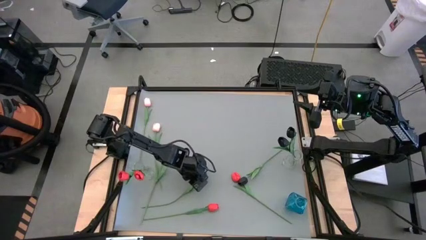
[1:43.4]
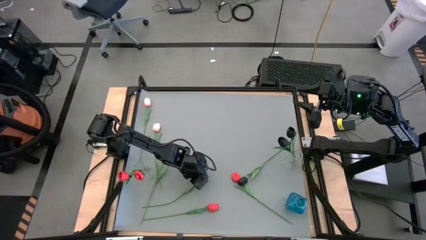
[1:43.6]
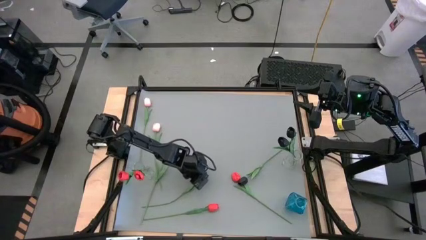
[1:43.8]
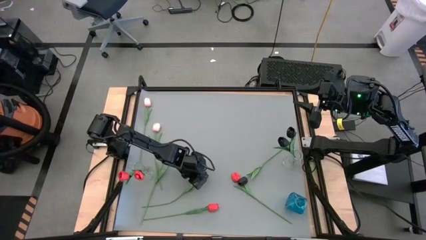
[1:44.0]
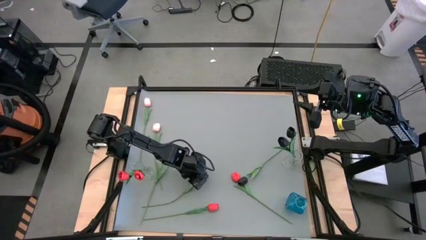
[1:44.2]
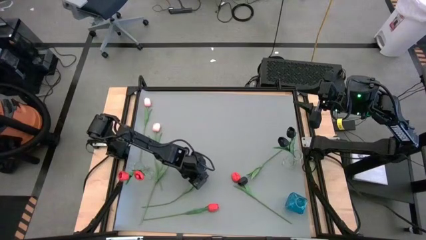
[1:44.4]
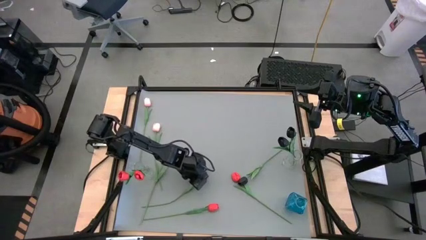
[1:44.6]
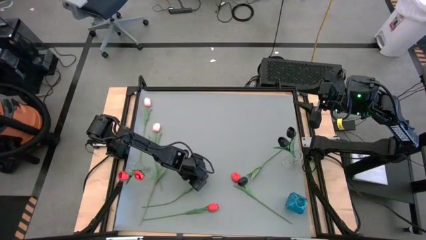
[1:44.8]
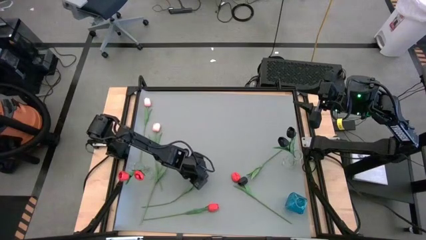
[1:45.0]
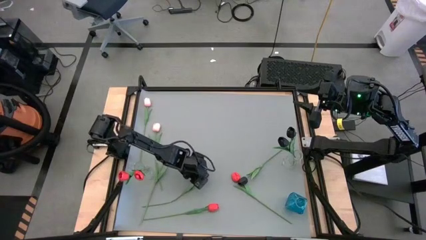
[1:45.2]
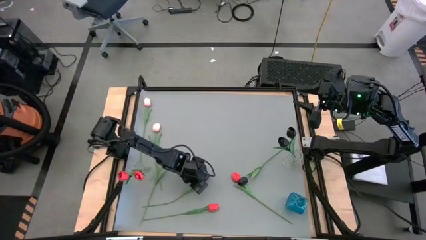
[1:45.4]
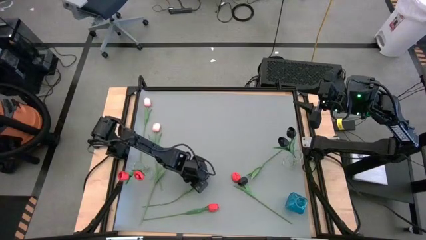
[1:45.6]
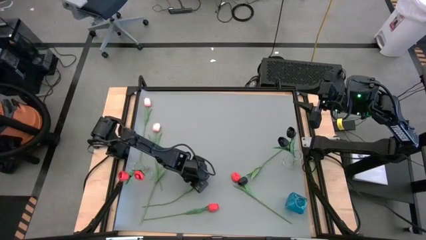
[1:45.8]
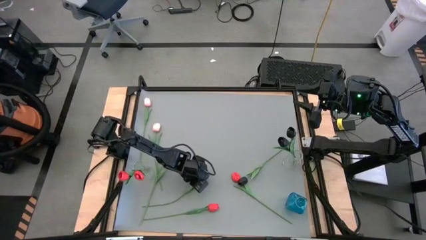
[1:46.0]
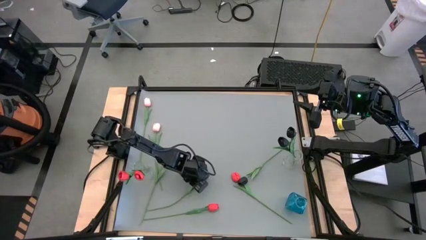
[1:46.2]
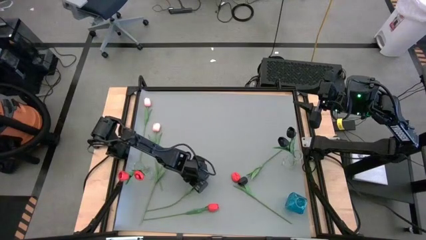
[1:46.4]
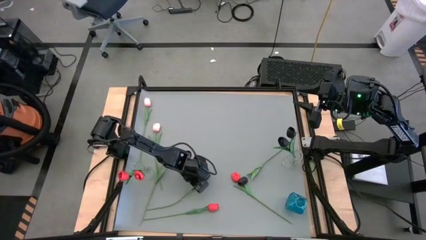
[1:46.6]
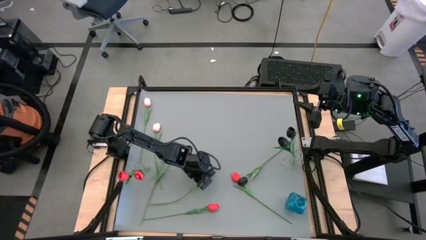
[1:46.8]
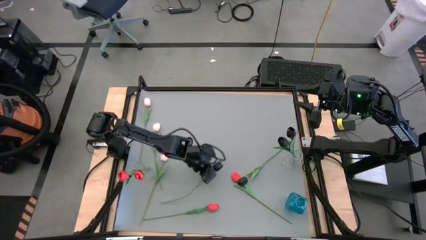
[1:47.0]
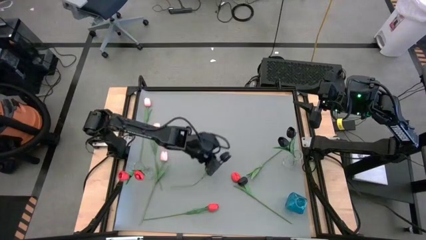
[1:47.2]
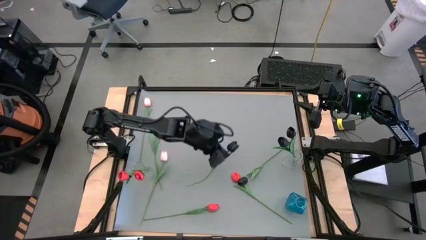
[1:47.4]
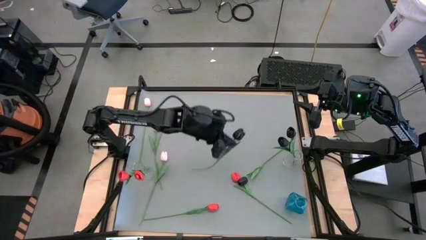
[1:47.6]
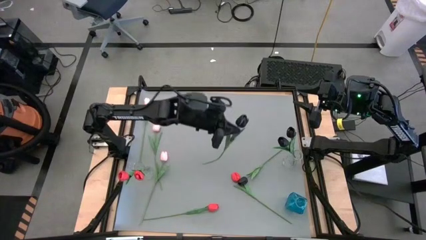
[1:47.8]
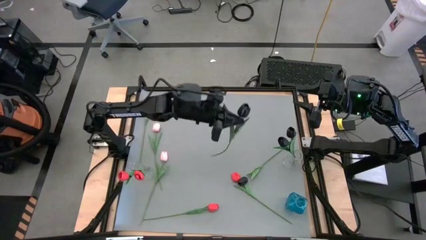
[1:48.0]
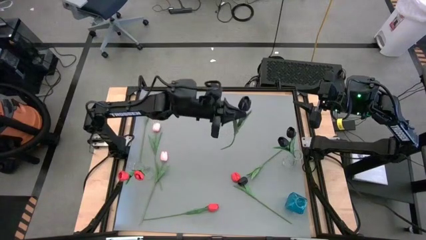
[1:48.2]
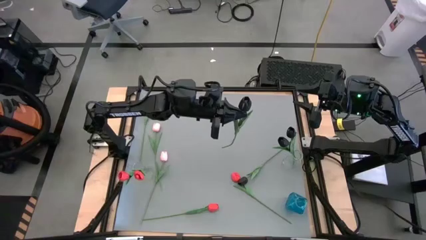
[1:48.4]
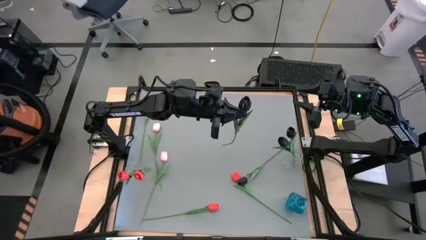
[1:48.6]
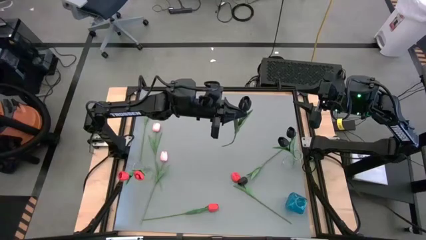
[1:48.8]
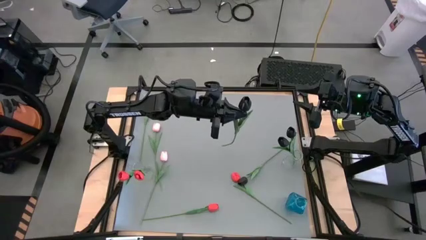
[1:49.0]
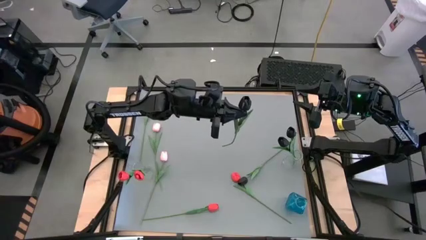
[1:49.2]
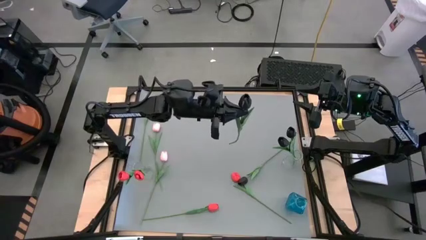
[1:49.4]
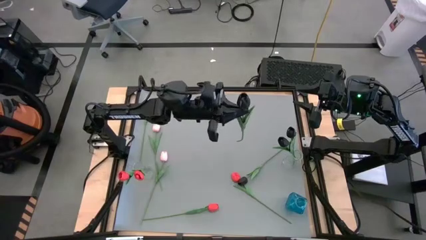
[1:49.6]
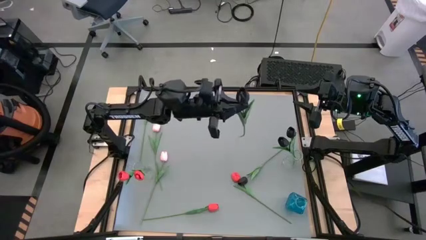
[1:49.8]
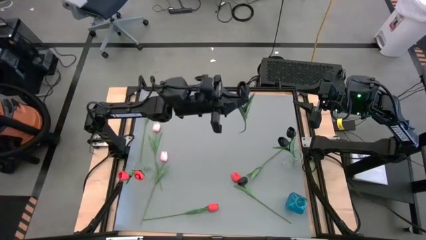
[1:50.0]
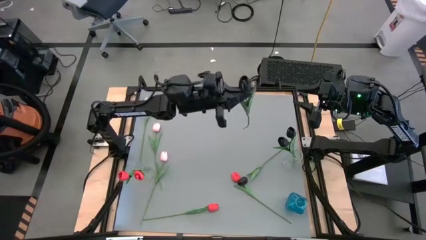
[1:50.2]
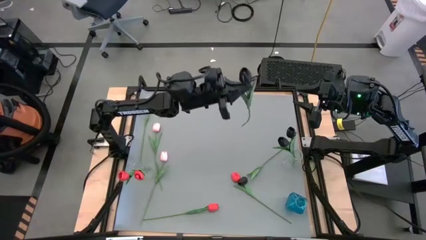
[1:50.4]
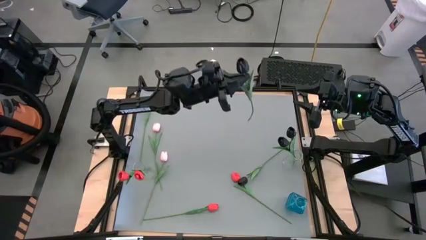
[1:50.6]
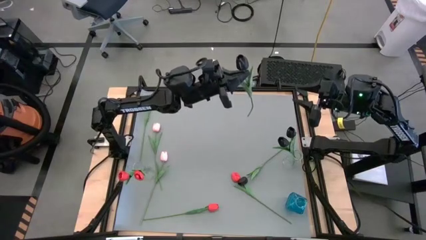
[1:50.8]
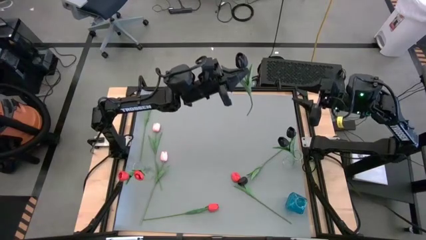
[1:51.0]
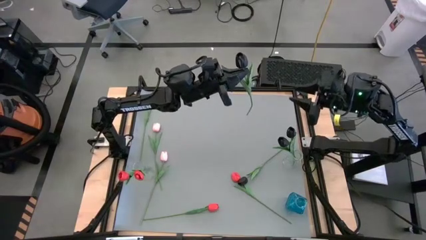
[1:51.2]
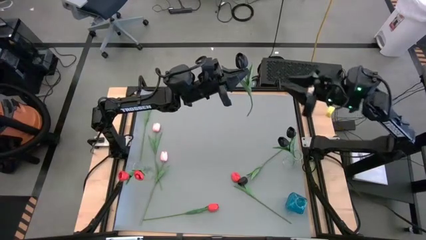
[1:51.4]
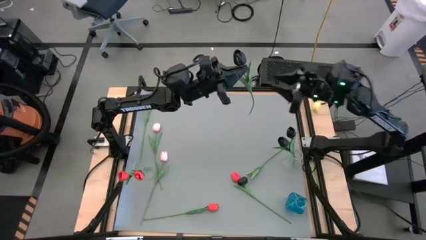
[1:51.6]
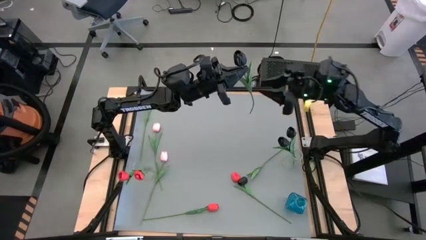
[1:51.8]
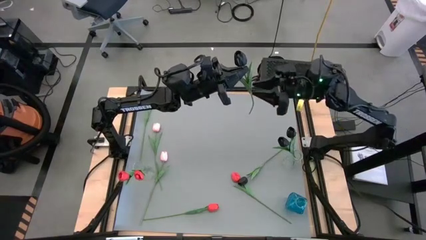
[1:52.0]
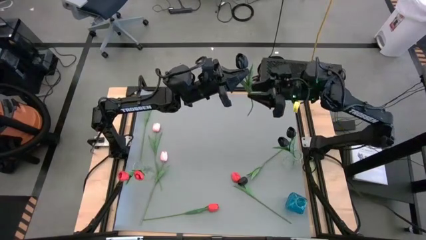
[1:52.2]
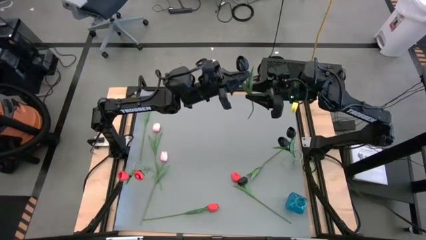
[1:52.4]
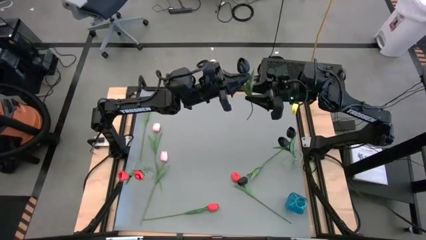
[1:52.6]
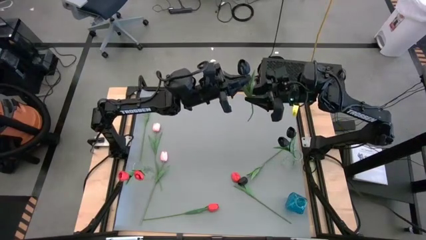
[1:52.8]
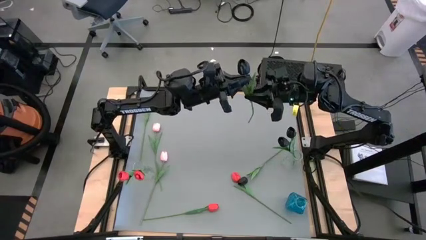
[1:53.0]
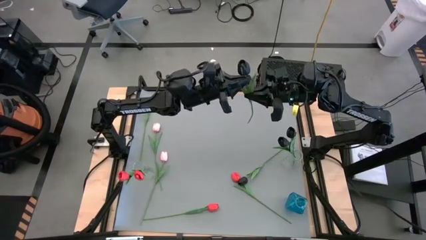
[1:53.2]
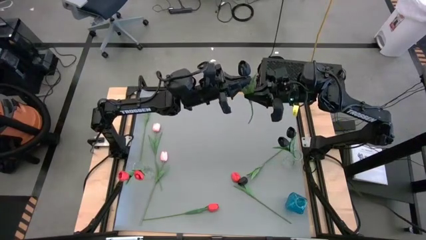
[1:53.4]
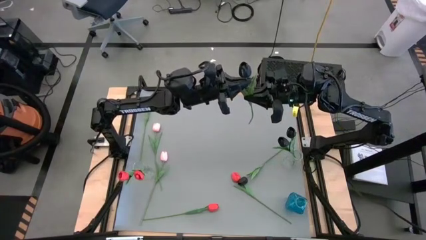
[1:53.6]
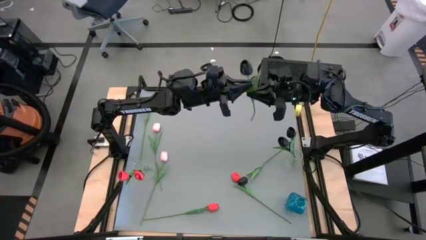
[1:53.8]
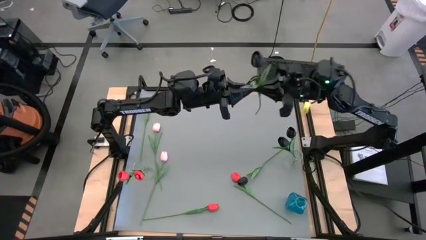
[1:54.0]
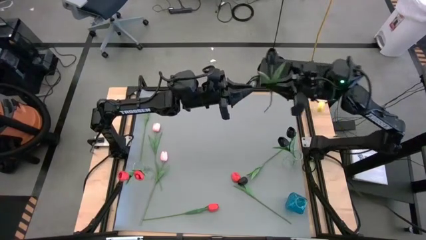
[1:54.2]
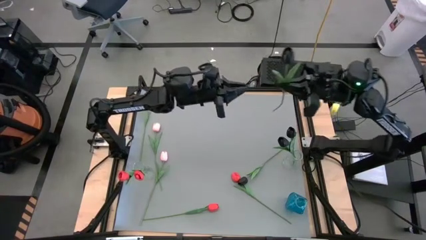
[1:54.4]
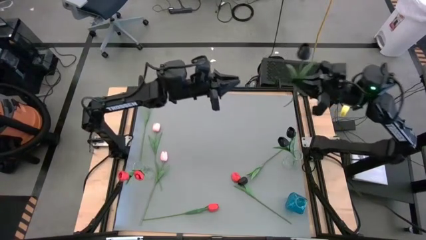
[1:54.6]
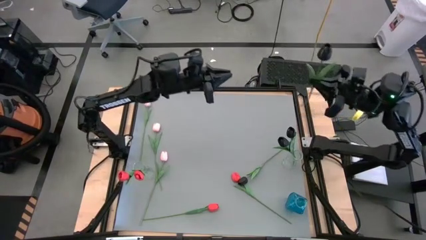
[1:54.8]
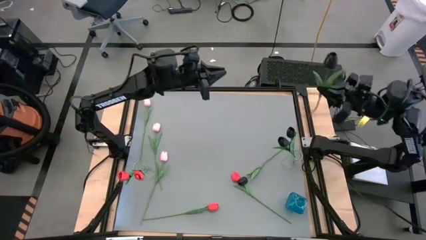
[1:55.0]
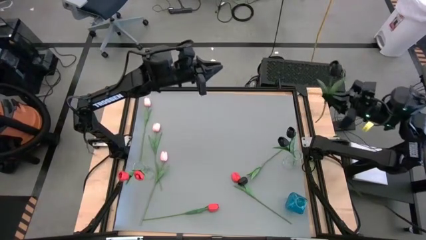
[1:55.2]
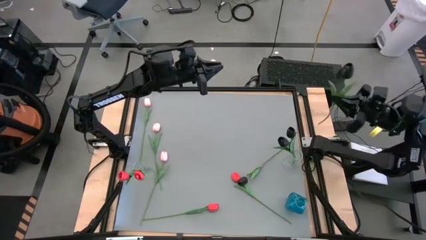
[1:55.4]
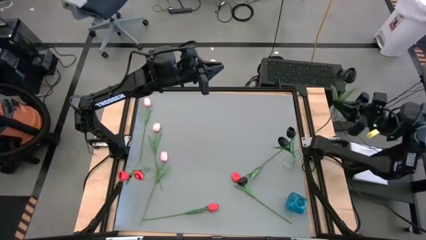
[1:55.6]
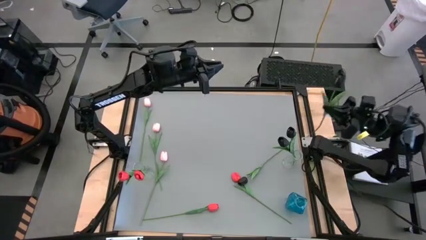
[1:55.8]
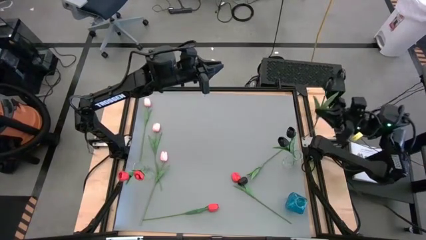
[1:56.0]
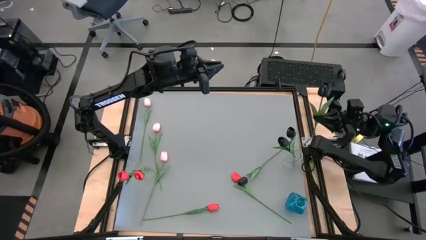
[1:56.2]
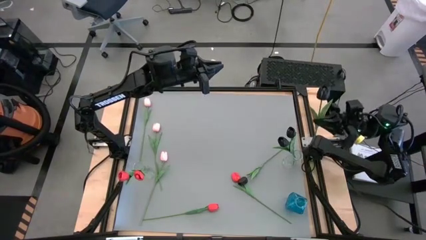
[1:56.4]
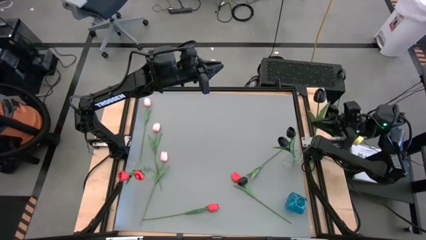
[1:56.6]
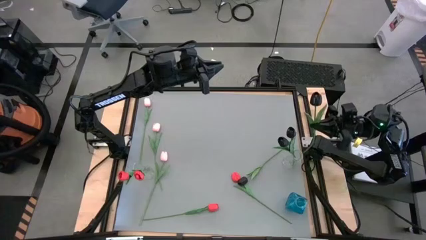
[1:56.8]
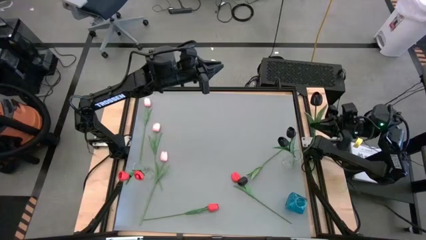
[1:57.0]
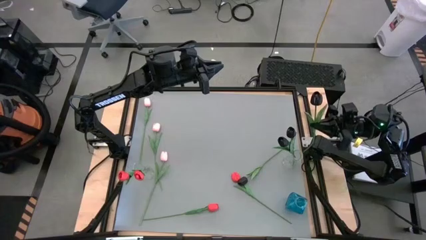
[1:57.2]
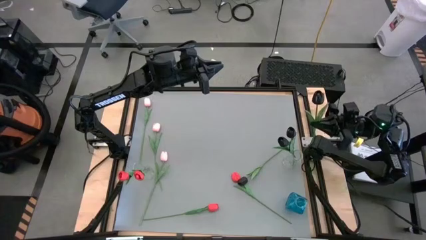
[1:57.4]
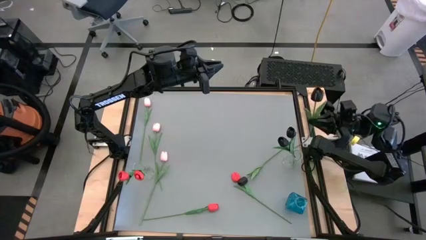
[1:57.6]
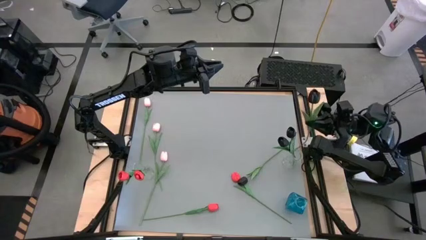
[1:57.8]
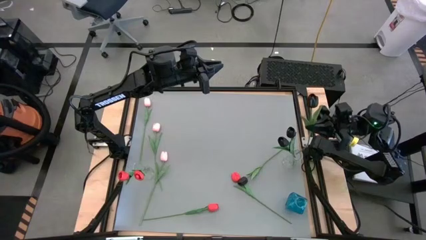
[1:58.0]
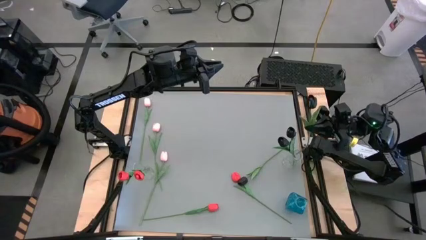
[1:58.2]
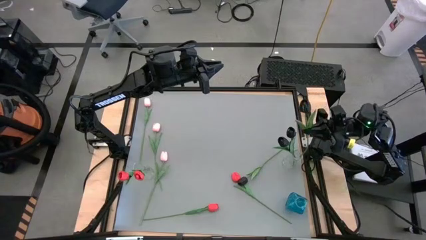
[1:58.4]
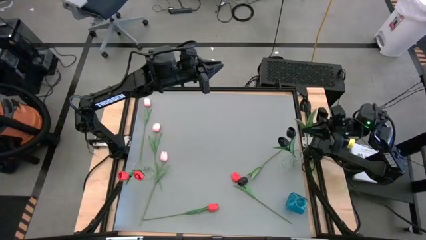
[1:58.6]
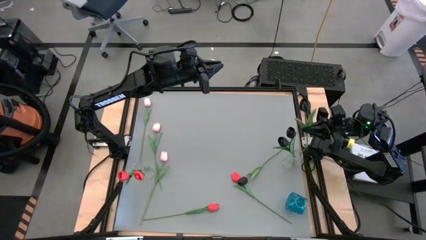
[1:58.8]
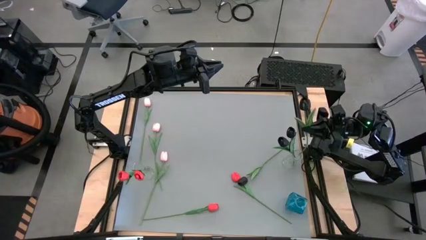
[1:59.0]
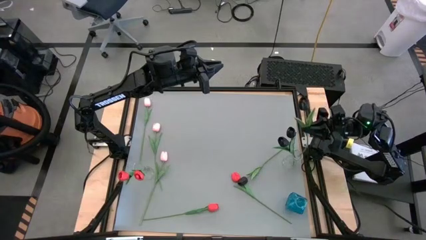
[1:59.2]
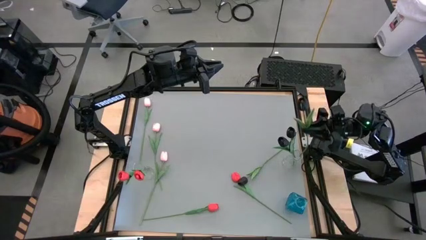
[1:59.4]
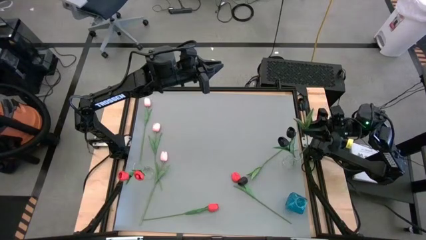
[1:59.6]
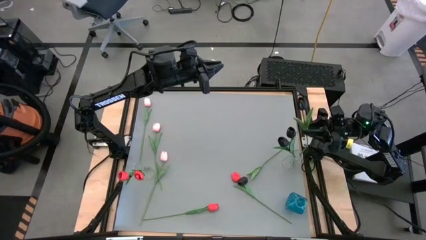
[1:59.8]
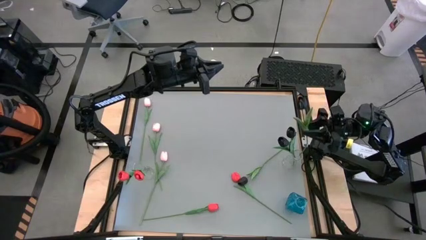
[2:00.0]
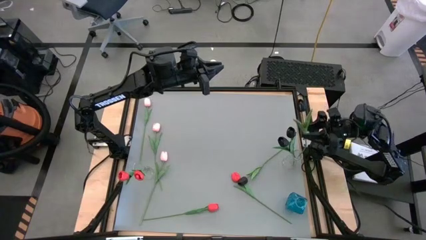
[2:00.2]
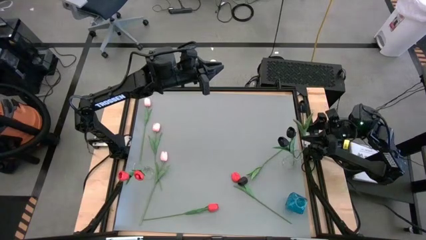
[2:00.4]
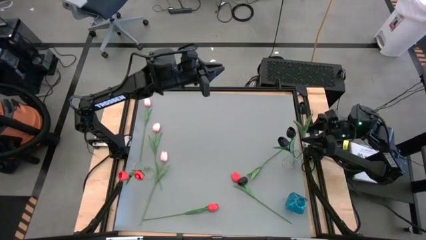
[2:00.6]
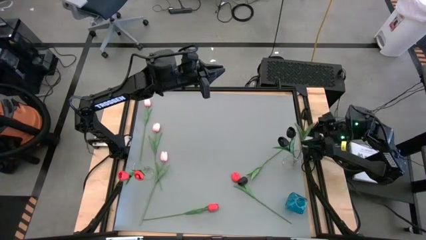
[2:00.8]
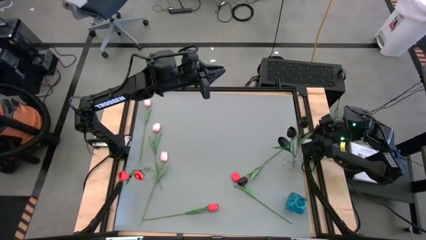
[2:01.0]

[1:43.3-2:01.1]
Task: Sort flowers into vase by color
Put the left black tulip into the right transparent vase
